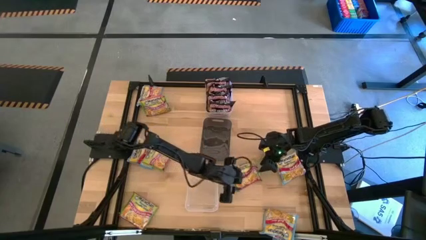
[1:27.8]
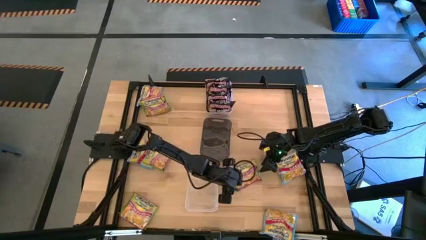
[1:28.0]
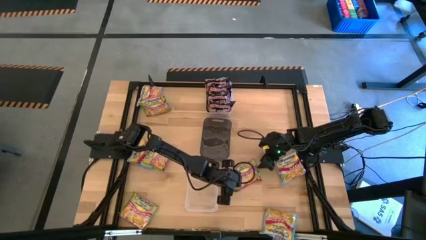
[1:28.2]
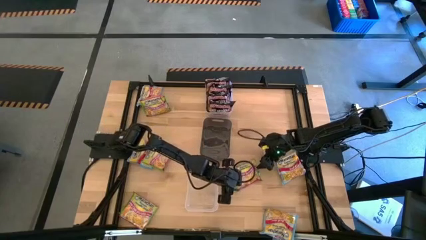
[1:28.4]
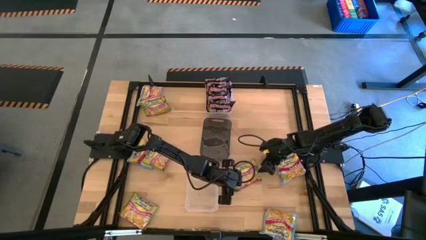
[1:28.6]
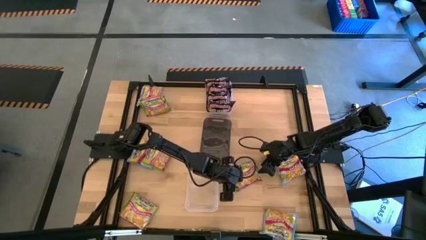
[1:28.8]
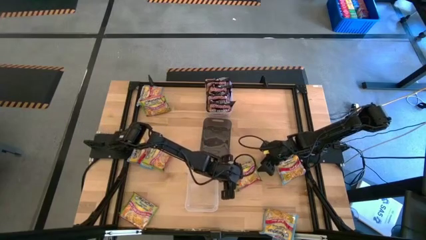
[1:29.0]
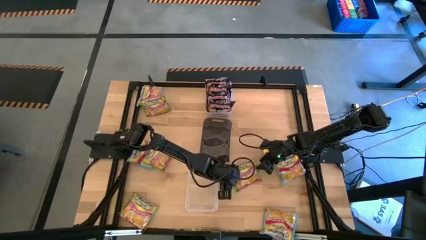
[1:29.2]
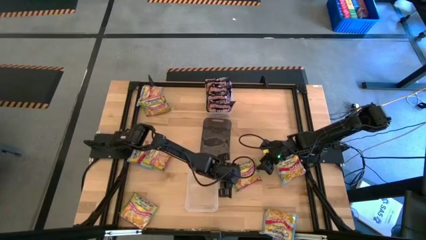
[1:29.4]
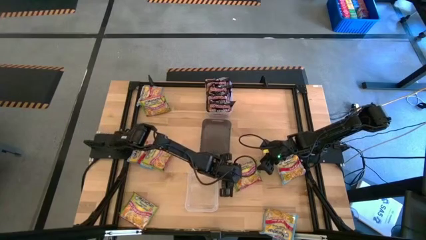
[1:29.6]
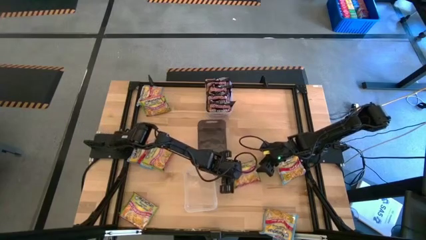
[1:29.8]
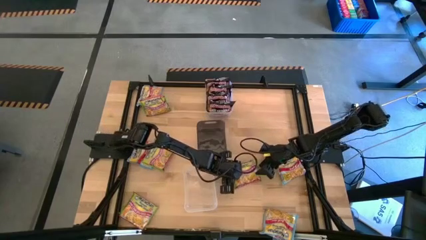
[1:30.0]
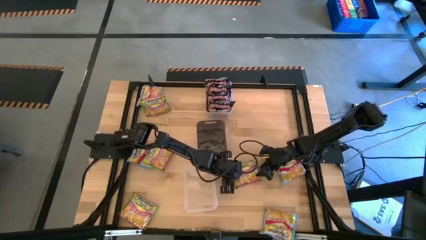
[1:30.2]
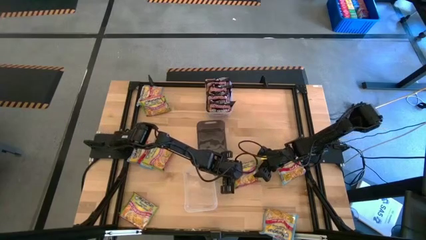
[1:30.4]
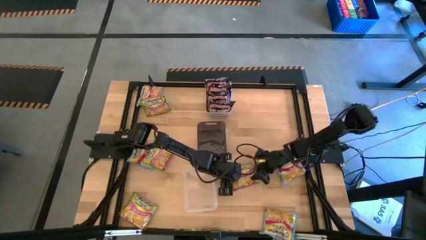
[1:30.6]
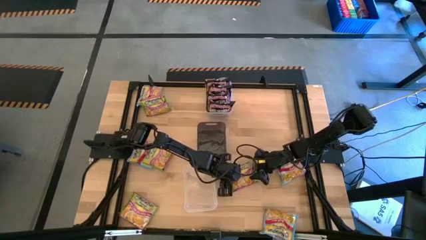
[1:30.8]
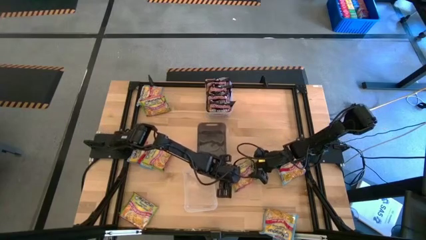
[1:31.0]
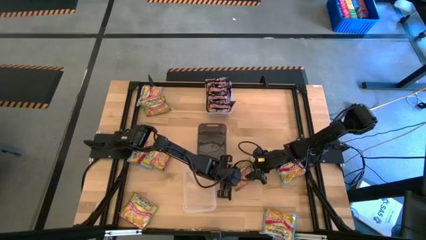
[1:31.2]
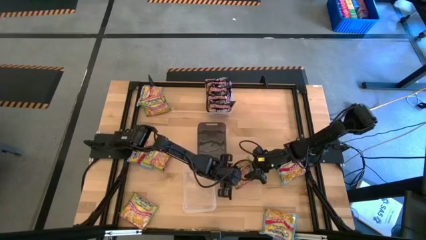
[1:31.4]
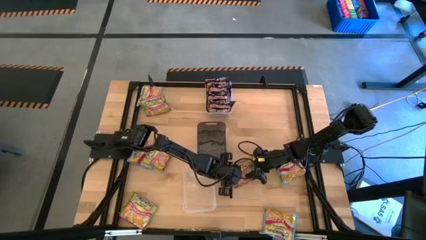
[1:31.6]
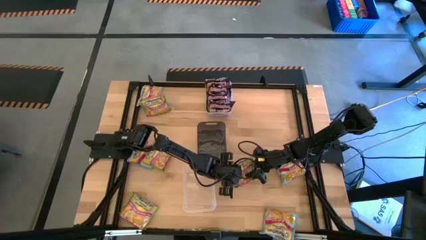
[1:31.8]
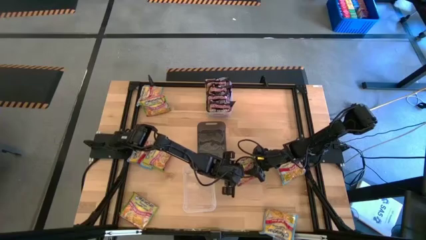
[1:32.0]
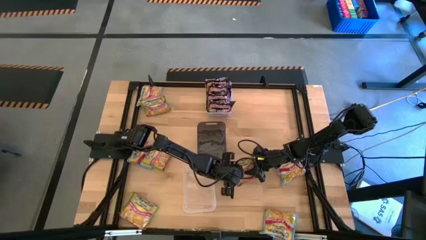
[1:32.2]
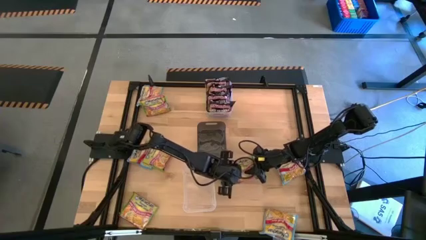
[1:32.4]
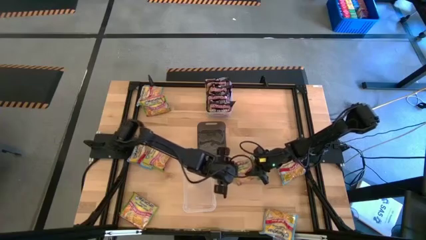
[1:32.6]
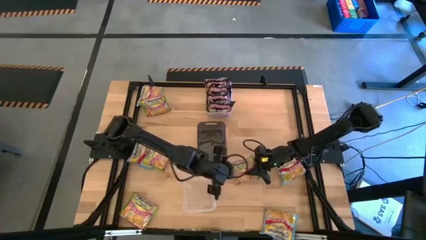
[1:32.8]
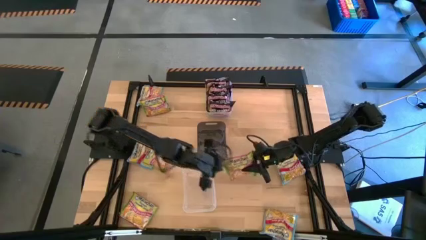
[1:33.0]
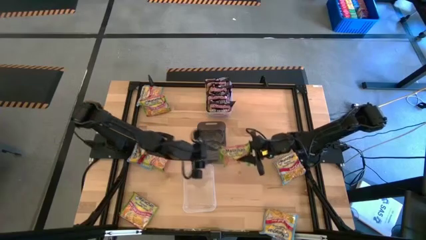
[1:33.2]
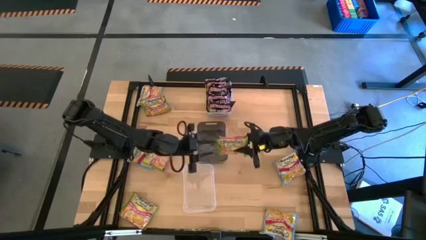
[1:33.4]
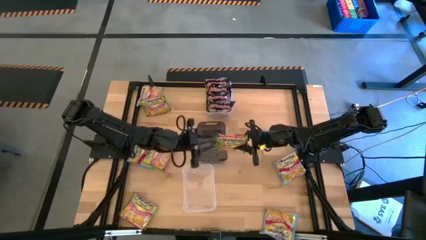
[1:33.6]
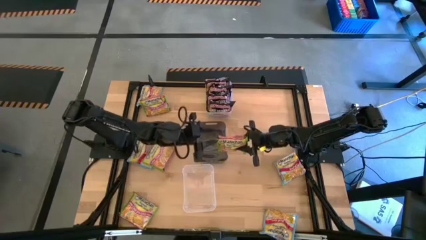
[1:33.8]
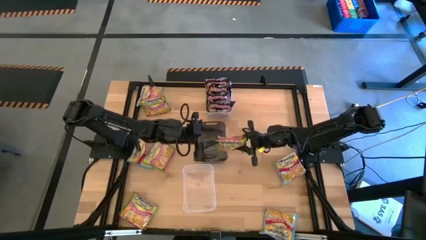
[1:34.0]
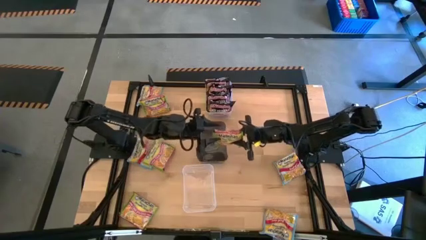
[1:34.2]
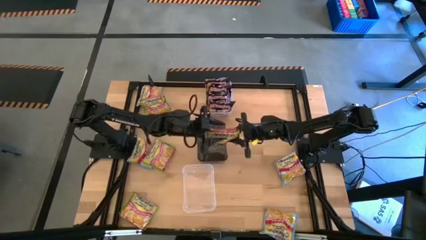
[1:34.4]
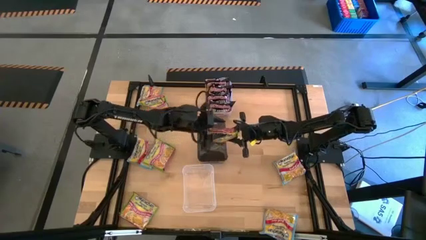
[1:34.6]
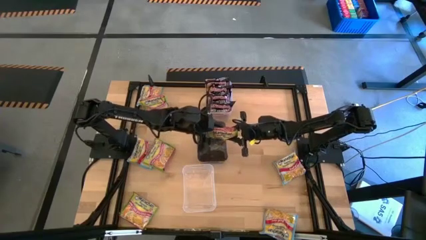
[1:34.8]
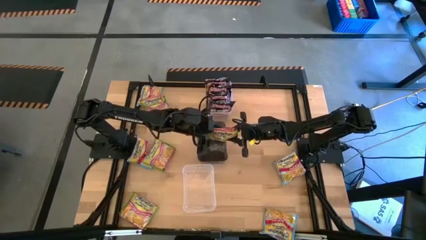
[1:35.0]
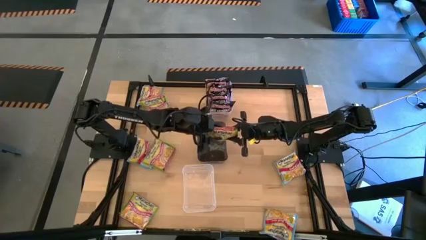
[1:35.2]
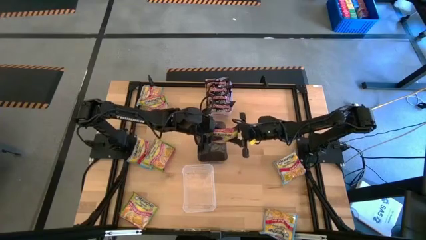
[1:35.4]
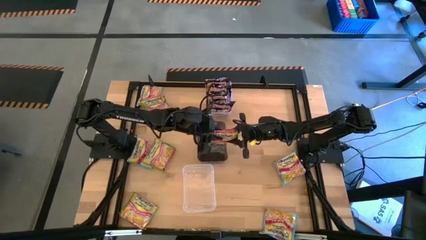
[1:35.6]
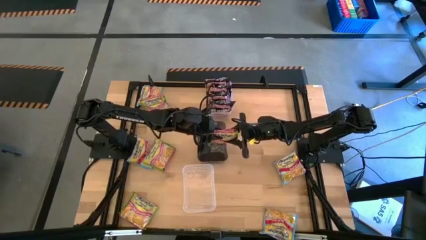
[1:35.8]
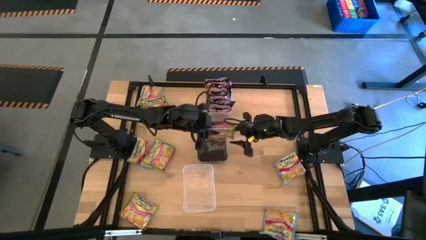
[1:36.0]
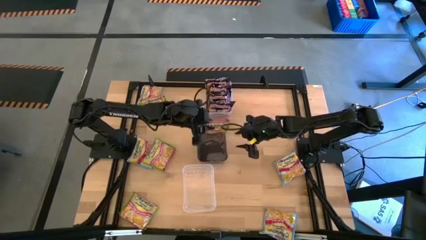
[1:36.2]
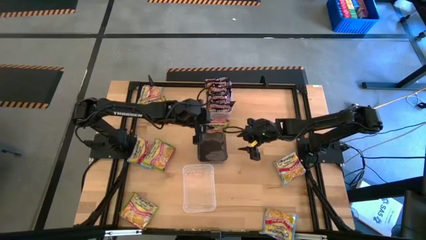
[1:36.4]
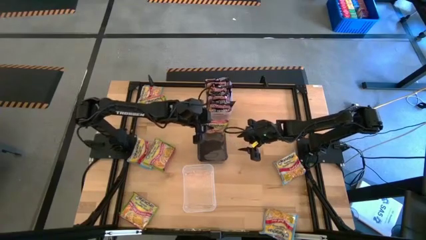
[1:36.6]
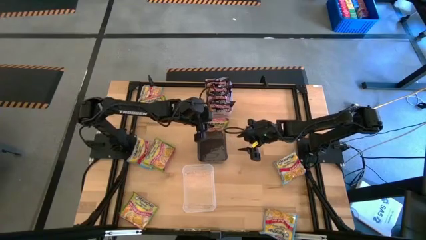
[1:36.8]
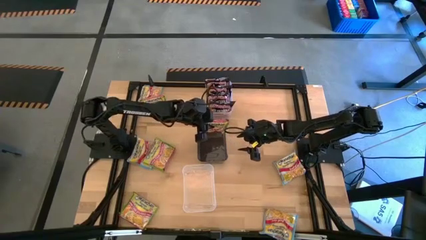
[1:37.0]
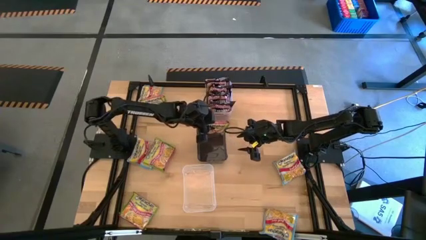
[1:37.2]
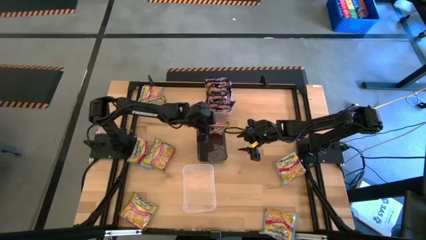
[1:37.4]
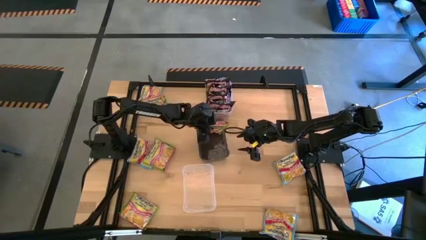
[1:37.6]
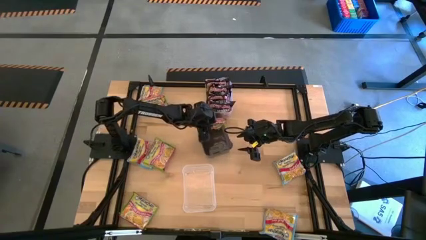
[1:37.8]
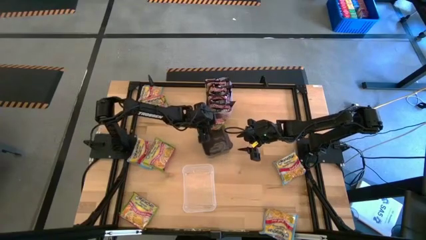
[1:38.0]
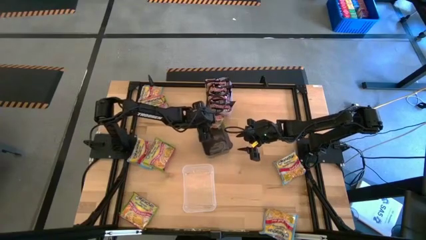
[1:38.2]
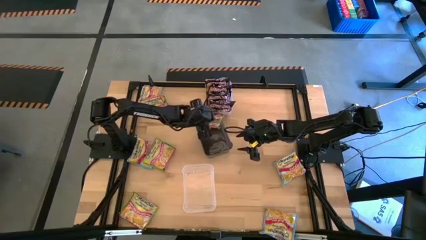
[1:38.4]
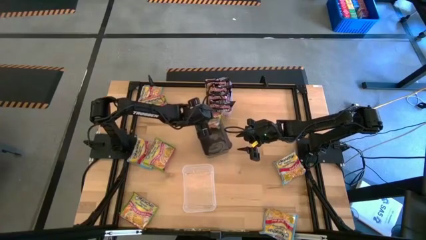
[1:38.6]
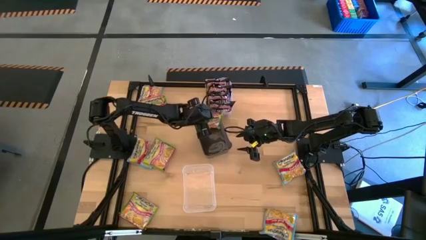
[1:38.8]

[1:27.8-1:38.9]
Task: Sort Maruchan noodles
Put the green noodle pack into the black bin

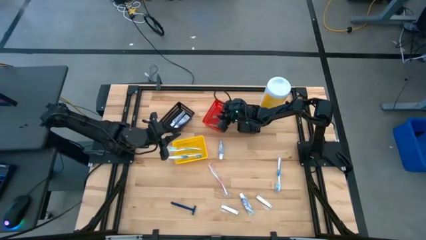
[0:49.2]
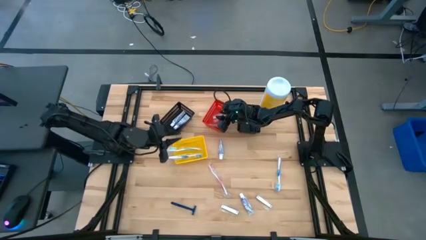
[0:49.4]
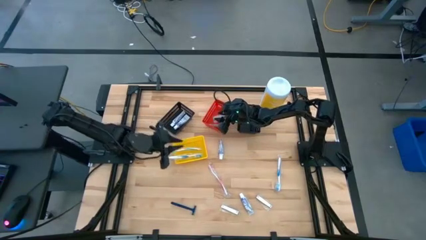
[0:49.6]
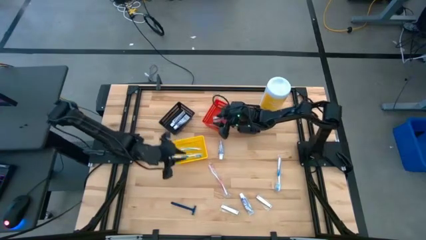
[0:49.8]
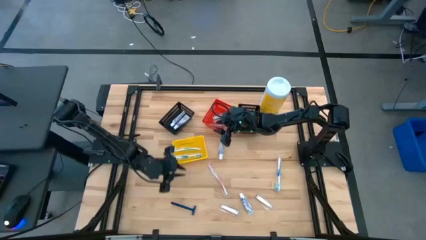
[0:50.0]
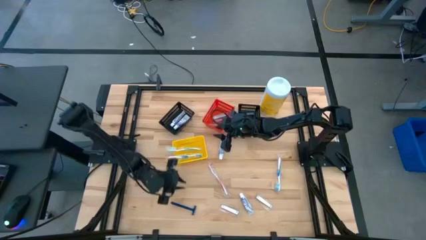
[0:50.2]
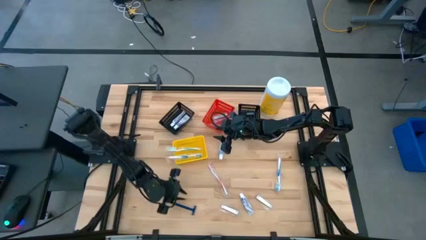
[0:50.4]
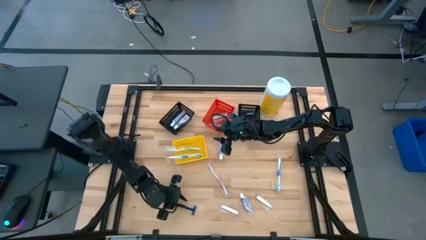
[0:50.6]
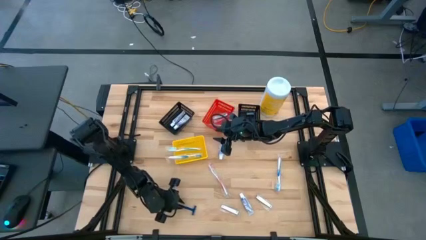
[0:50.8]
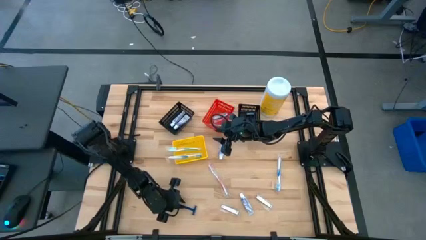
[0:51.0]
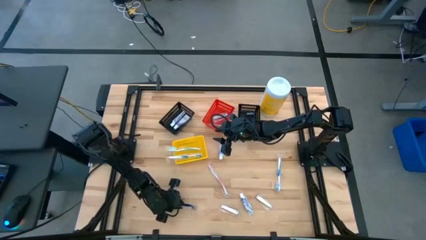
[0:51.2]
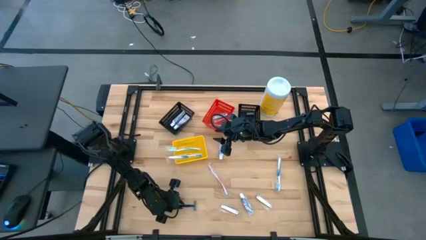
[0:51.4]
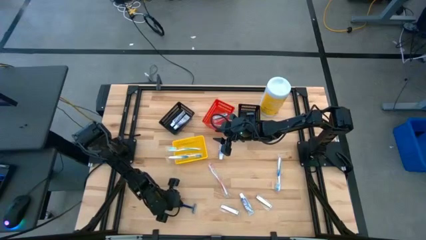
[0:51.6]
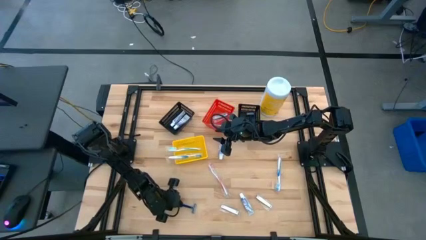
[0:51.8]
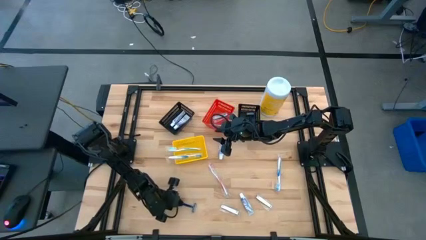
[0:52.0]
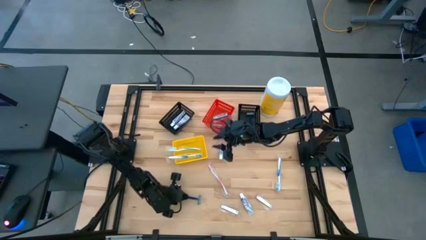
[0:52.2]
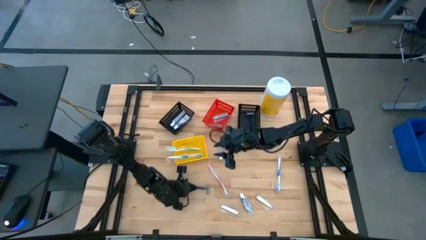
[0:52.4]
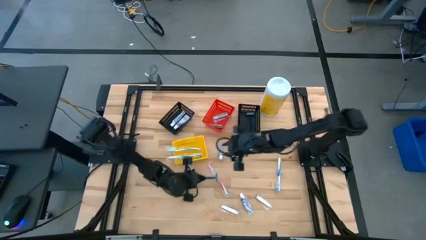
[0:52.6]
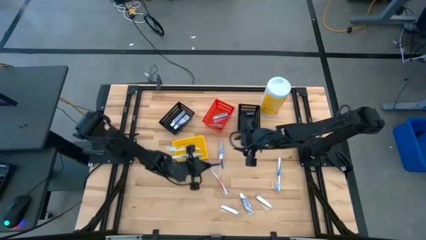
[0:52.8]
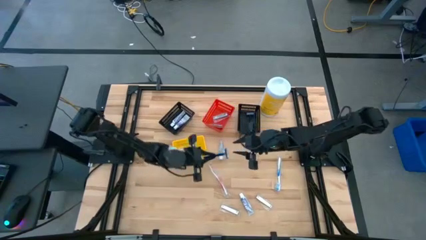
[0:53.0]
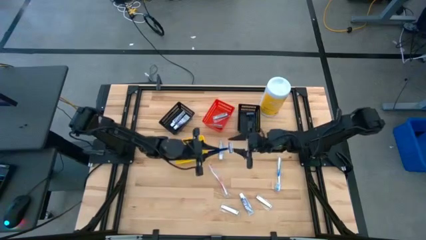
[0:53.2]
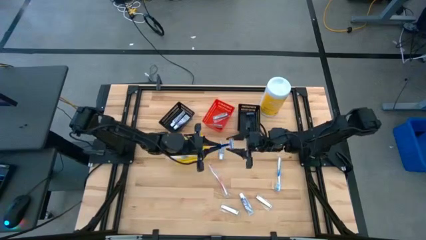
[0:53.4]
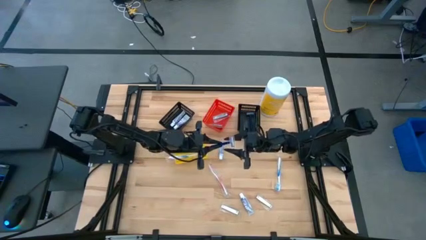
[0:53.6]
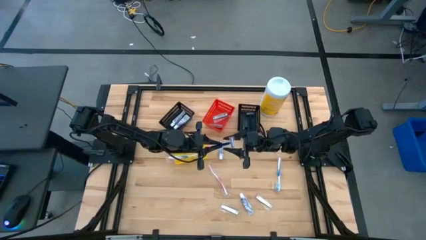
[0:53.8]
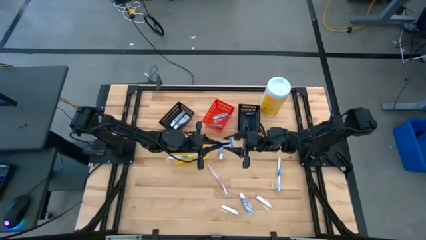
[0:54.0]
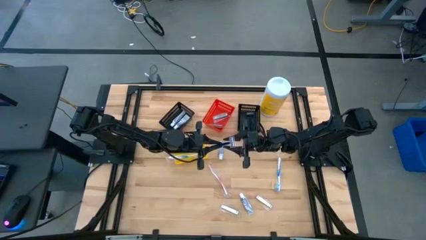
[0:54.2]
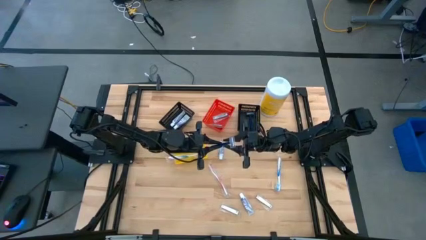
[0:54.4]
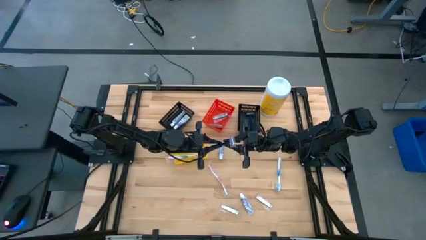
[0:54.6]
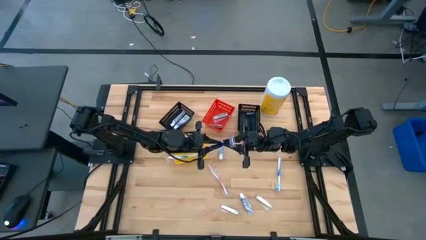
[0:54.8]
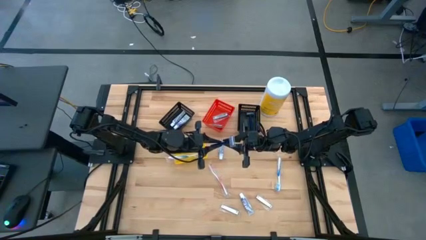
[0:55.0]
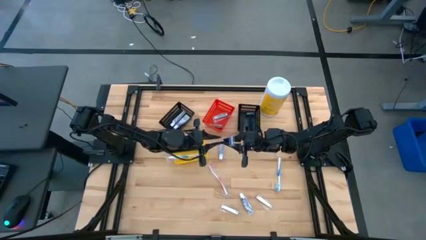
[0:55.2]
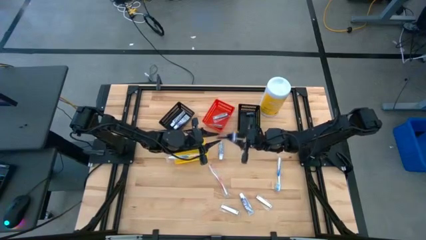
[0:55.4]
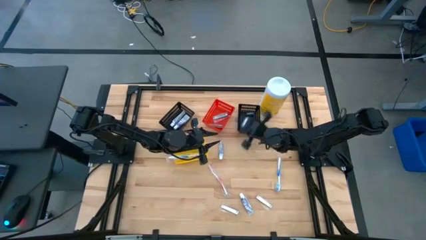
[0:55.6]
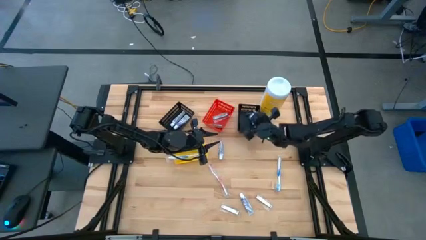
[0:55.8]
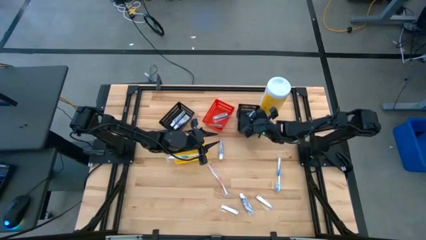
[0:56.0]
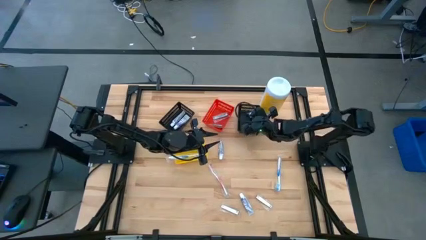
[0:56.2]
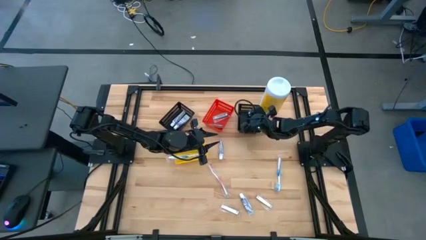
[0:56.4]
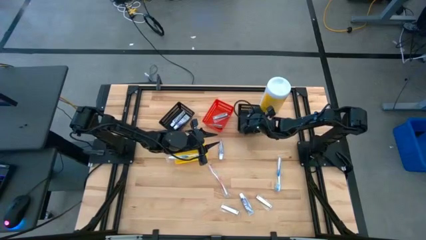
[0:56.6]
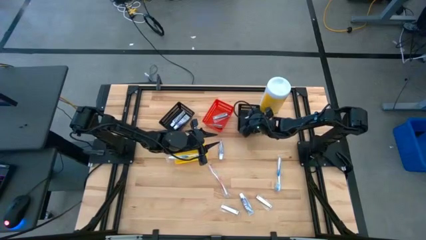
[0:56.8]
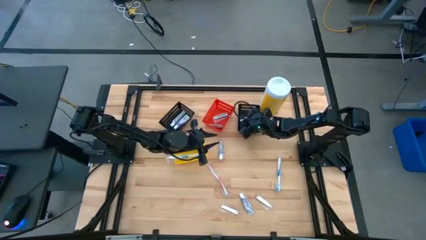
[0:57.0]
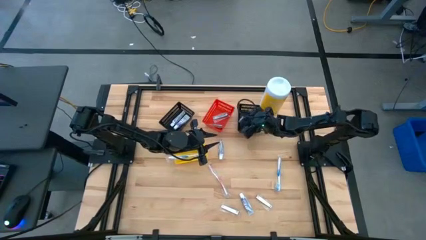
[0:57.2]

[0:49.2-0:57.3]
Task: Pick & Place Travel size toiletries
Put the blue razor into the right black bin
